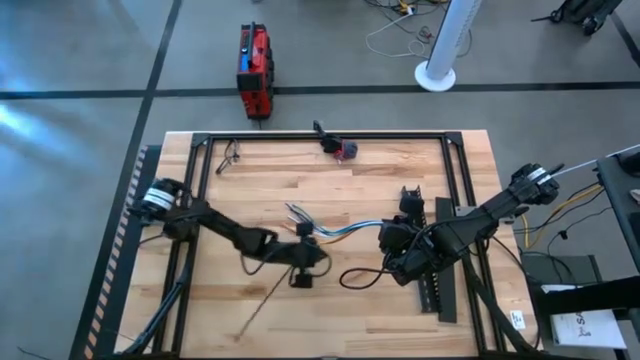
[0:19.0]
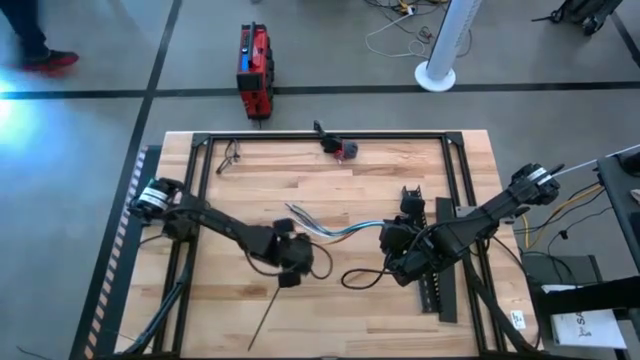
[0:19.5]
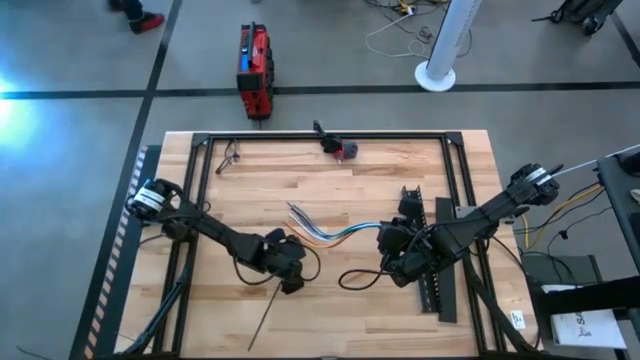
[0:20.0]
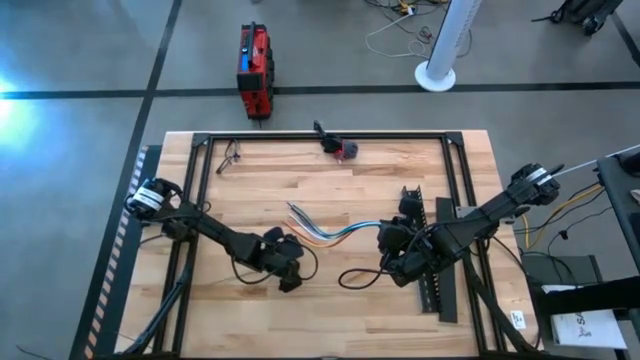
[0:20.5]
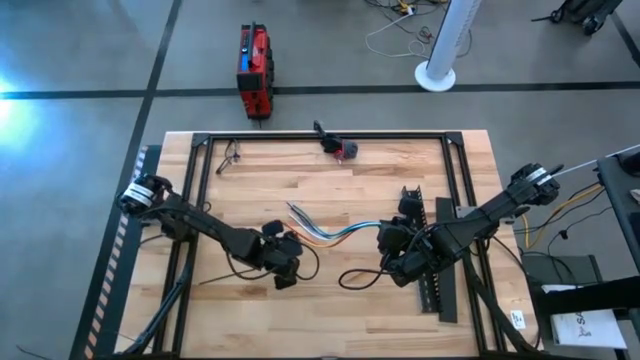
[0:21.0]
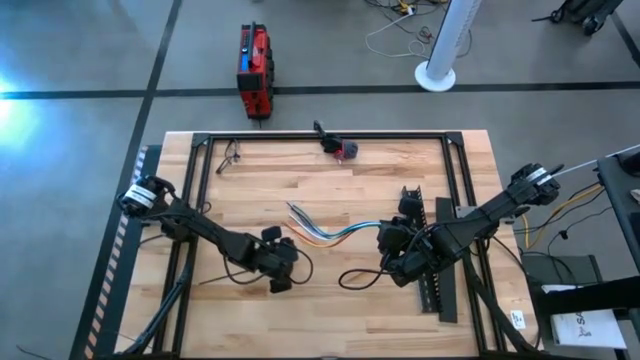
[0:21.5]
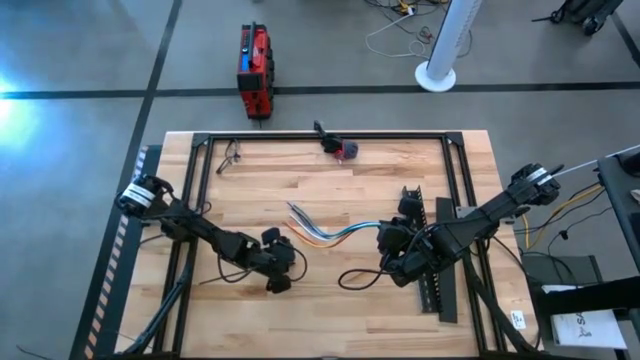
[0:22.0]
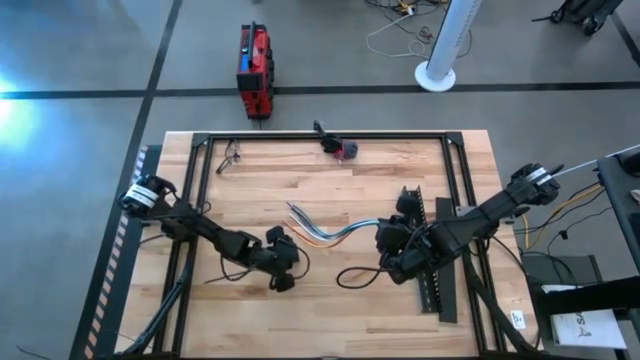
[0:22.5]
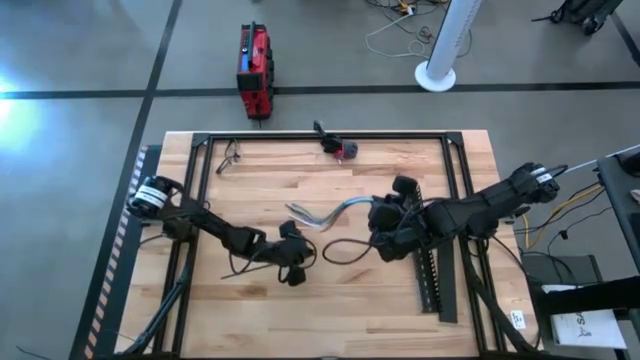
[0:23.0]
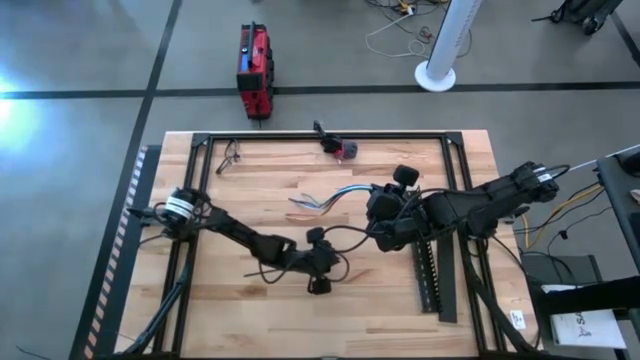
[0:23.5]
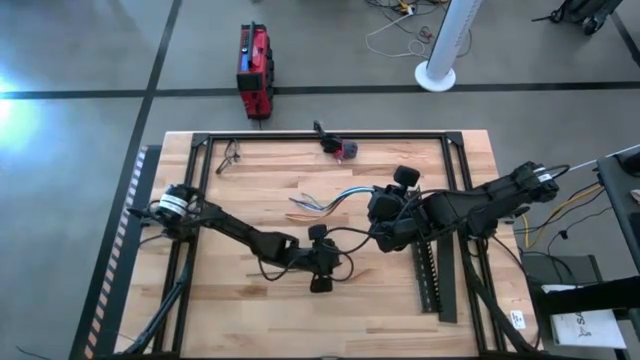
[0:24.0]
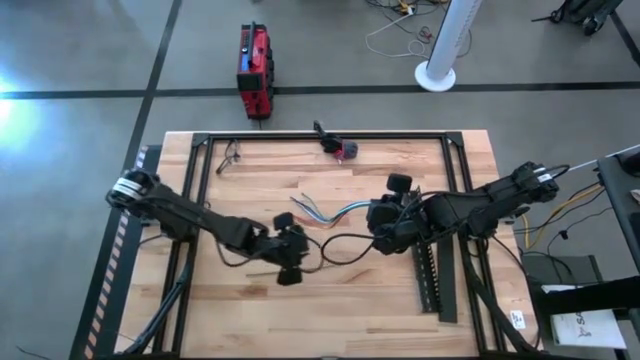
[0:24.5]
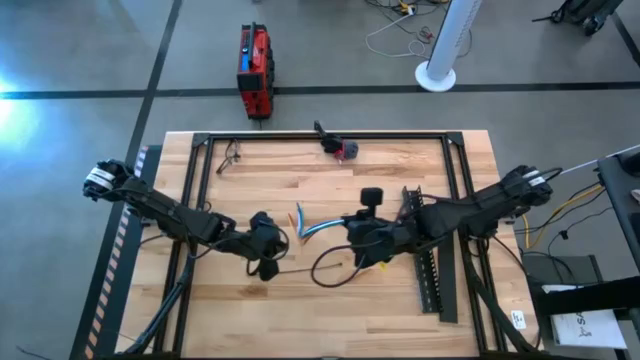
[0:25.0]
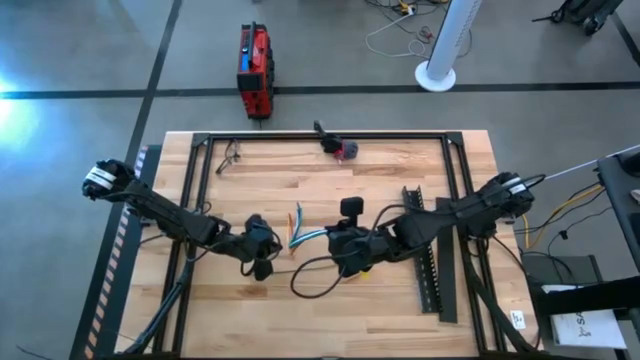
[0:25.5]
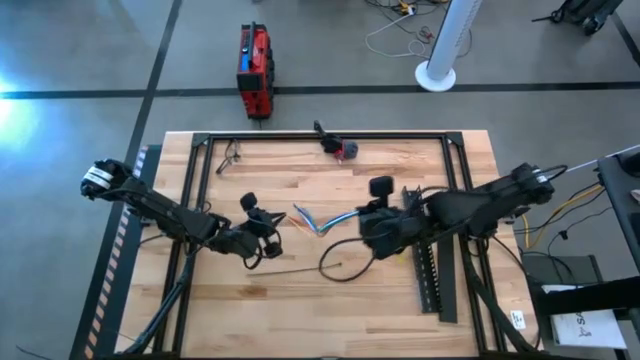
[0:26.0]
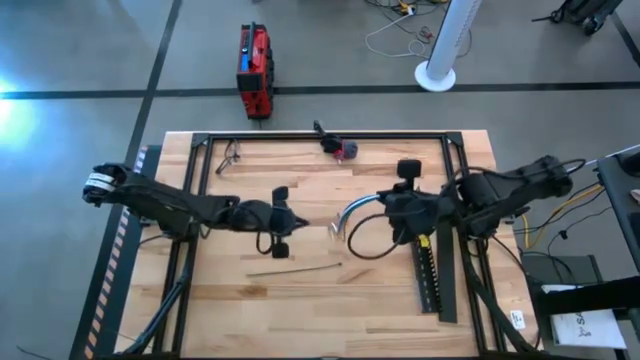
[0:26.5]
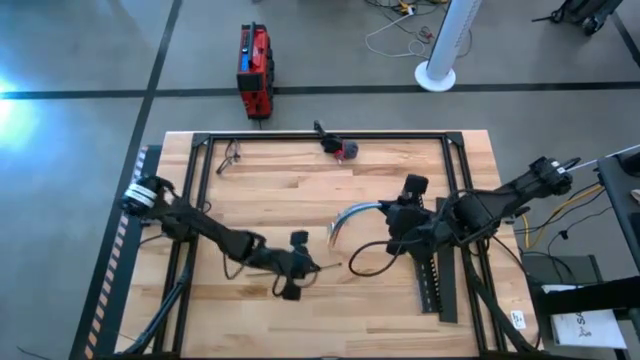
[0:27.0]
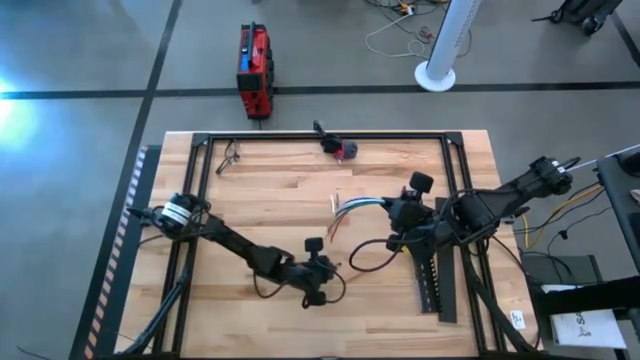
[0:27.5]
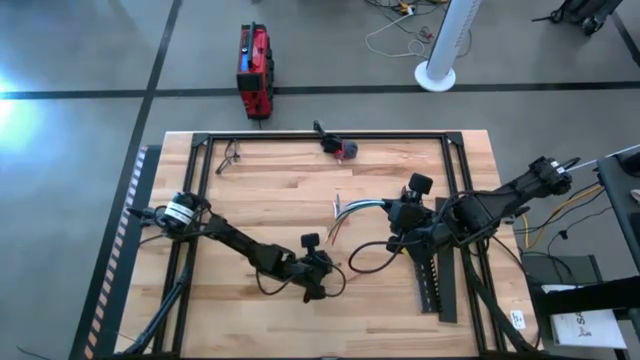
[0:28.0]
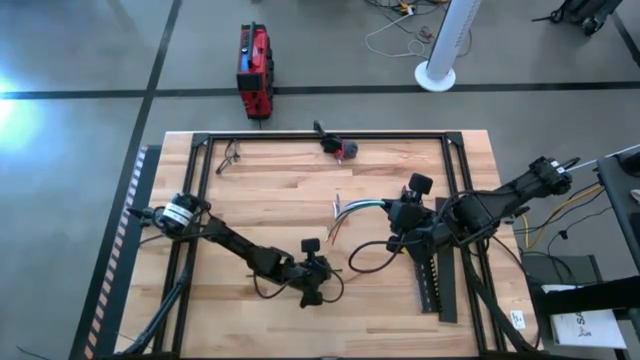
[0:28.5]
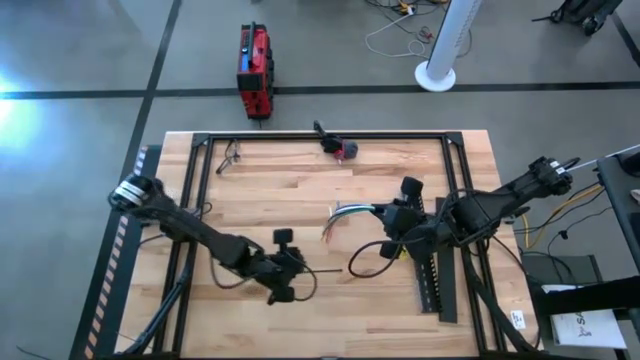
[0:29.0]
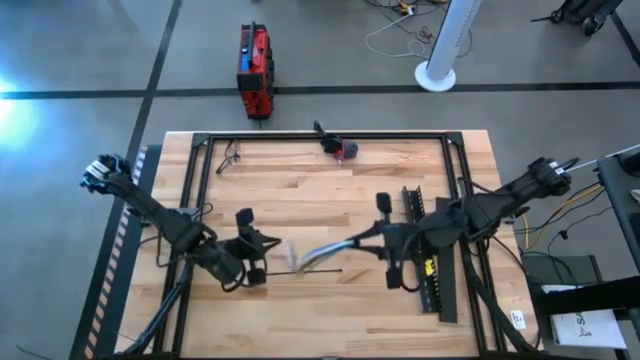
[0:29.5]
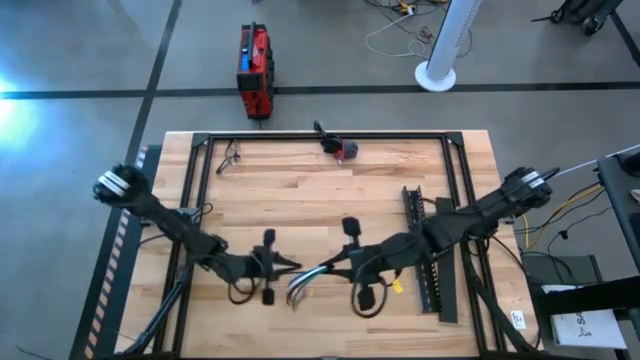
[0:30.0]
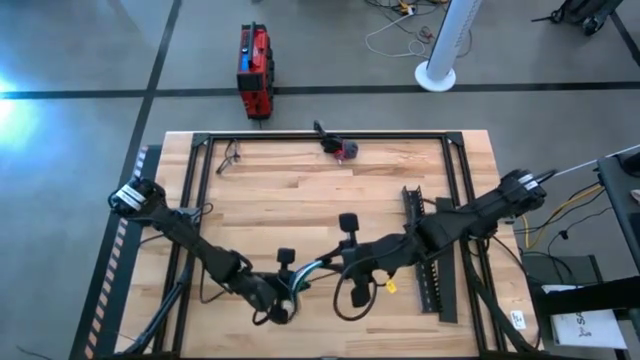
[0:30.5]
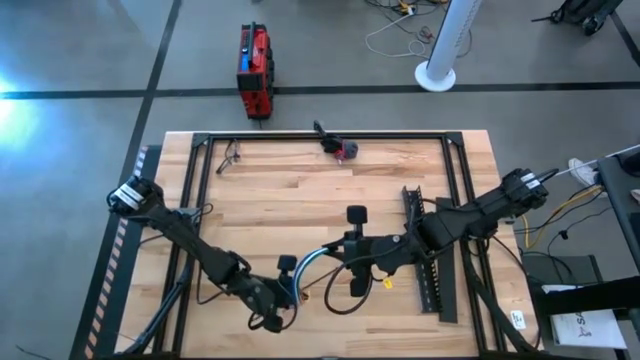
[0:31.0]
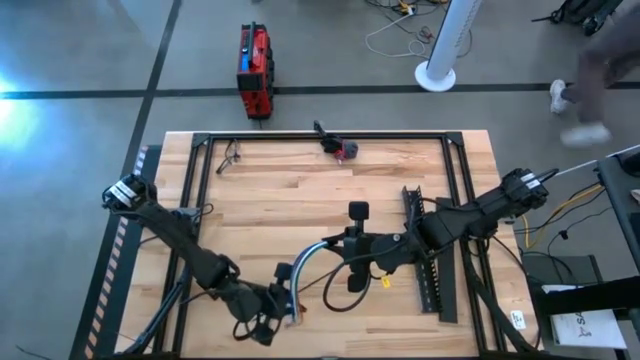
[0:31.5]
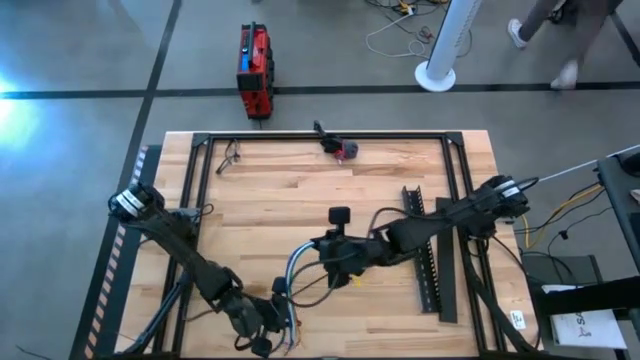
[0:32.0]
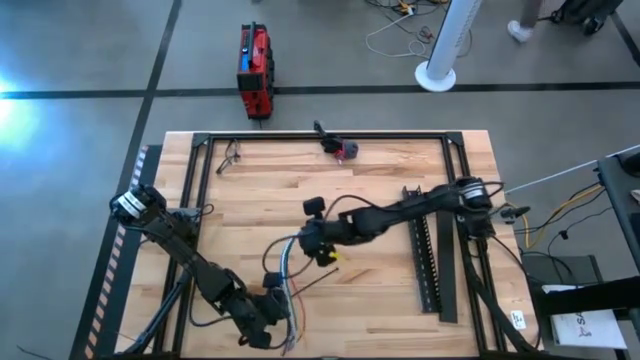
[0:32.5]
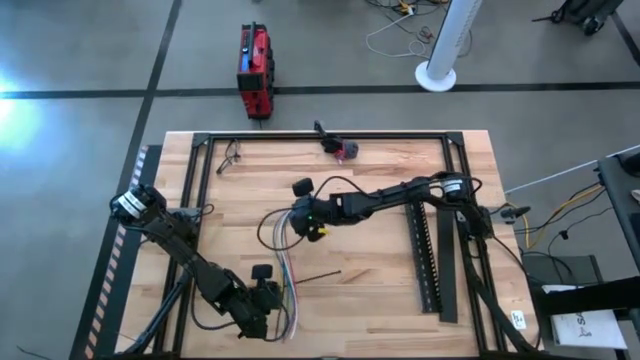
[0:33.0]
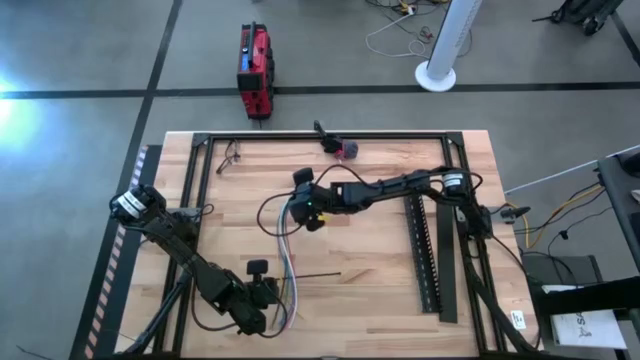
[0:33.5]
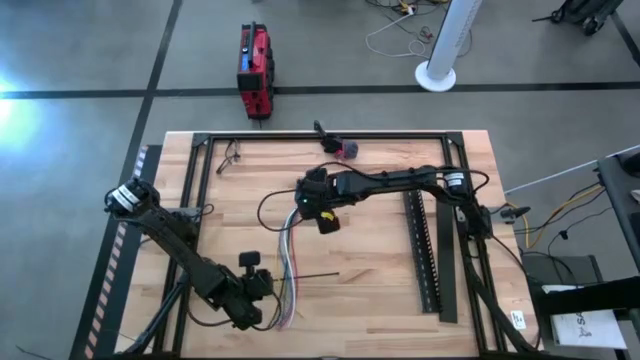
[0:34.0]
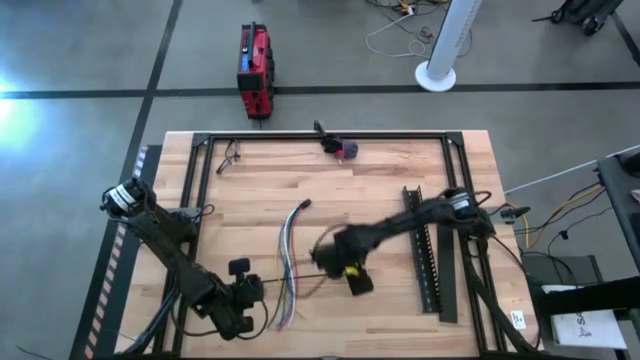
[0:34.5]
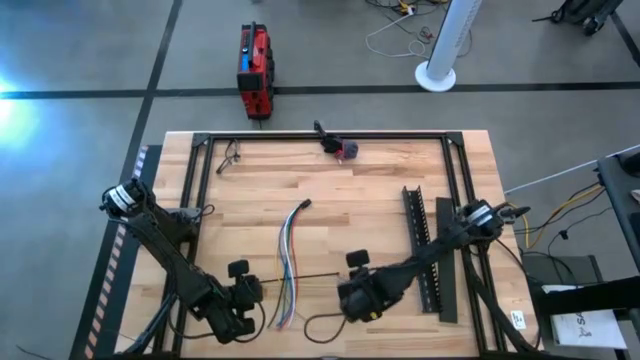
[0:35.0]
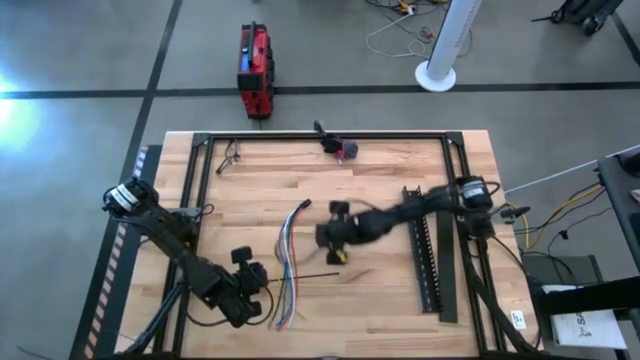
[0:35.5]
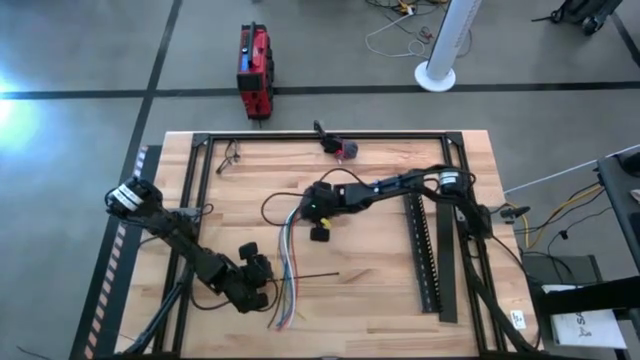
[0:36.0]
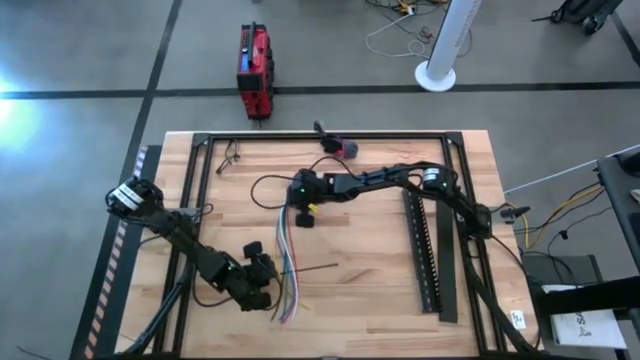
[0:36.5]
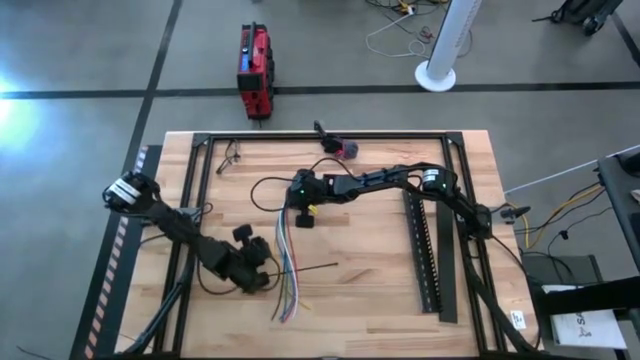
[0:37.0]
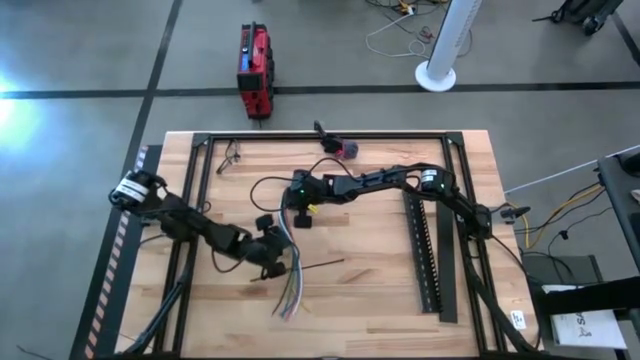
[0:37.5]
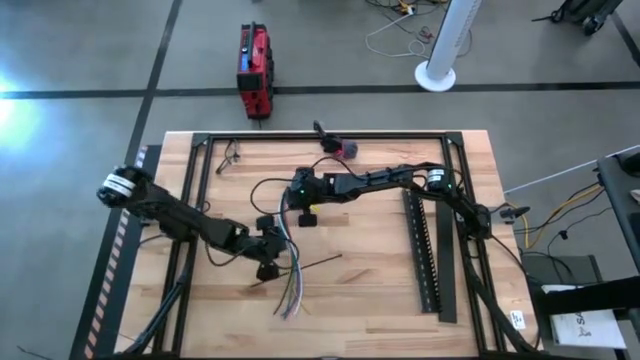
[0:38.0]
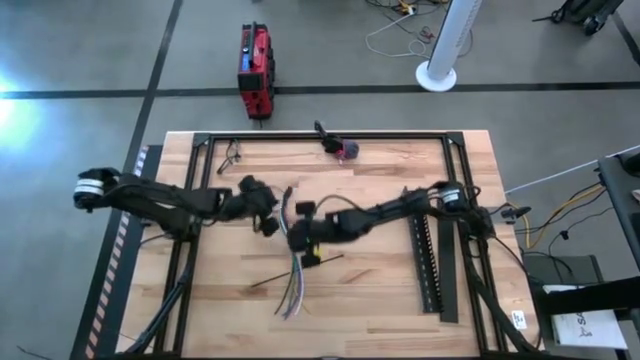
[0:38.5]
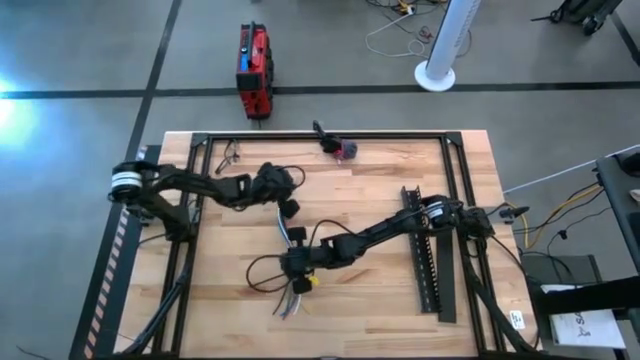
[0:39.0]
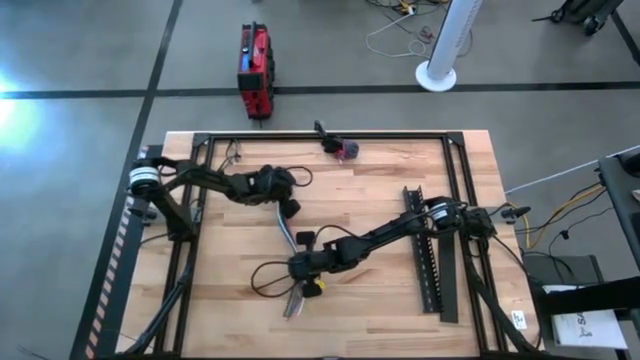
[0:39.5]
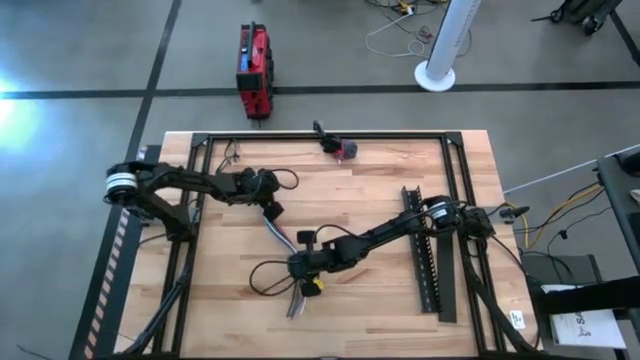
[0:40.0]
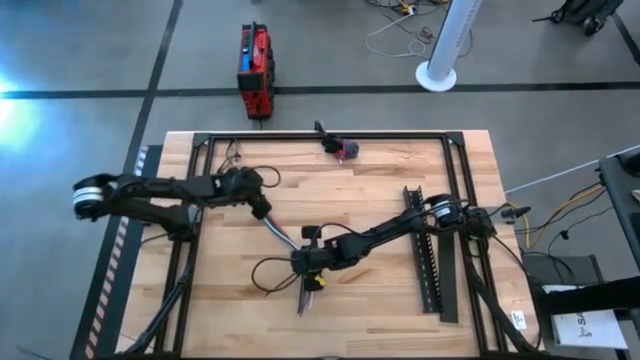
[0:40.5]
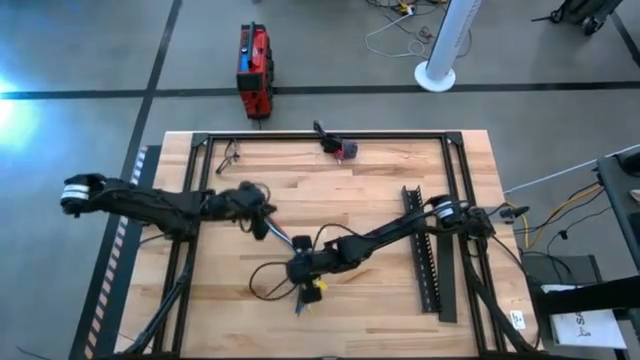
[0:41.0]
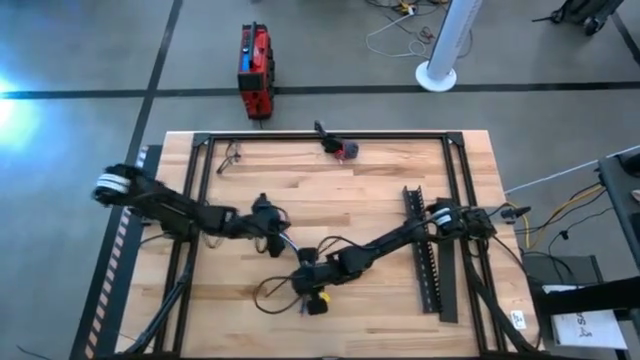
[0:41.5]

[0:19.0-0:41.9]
Task: Ziptie cables
Close the cables together using a zip tie
